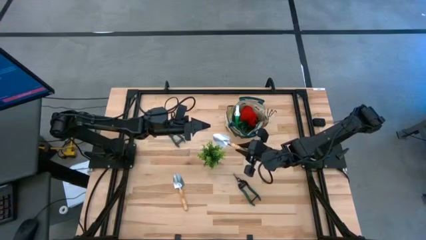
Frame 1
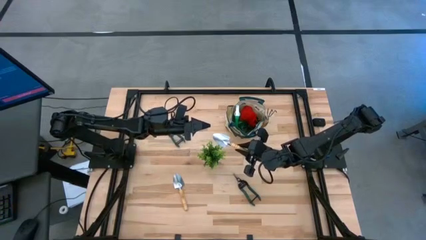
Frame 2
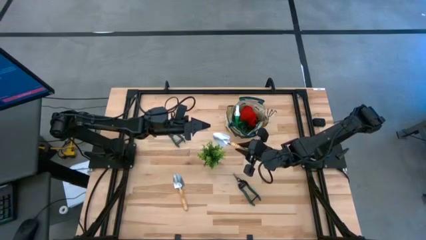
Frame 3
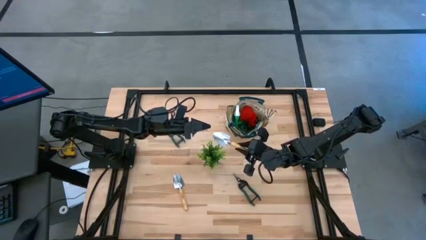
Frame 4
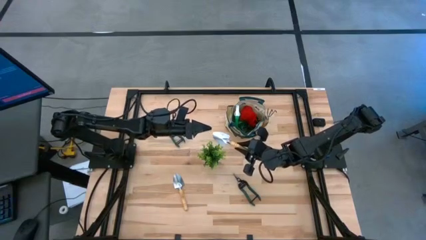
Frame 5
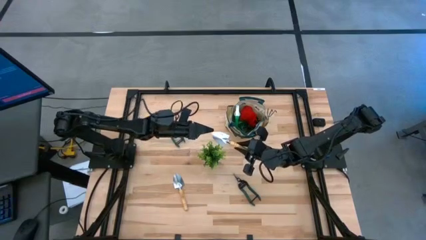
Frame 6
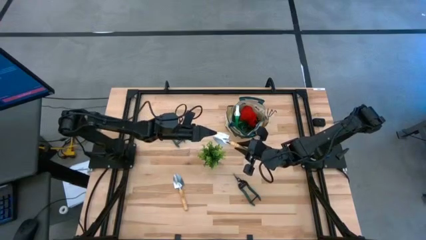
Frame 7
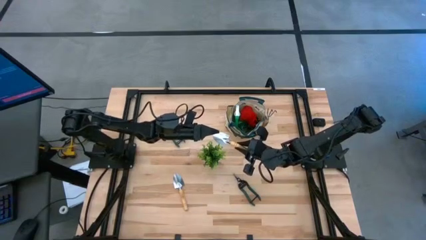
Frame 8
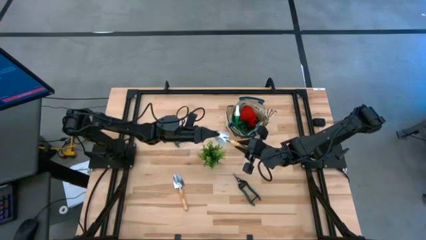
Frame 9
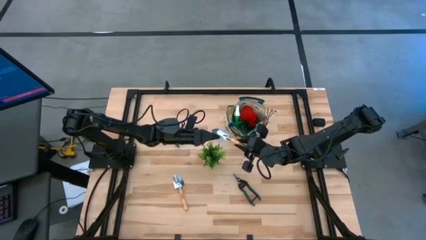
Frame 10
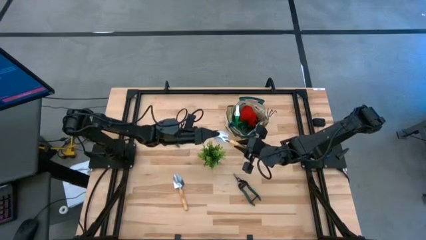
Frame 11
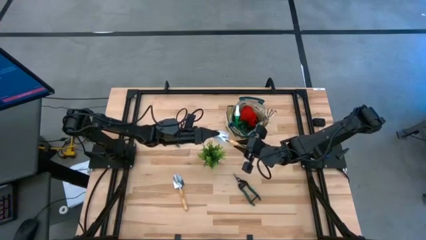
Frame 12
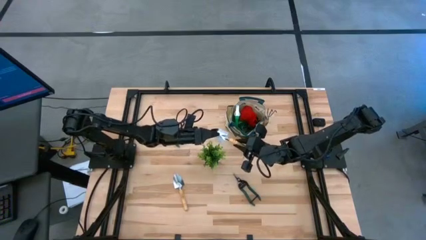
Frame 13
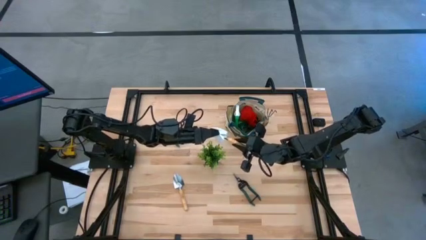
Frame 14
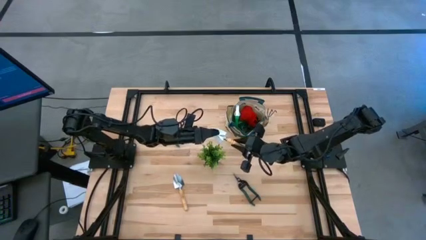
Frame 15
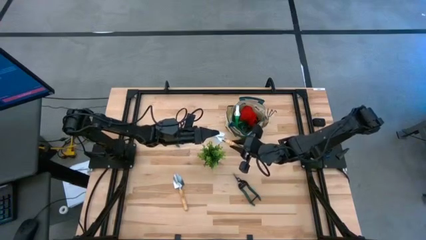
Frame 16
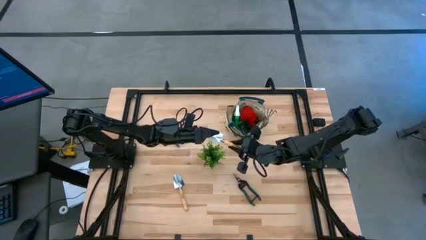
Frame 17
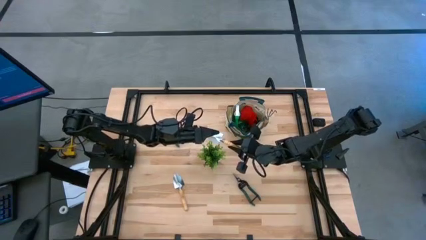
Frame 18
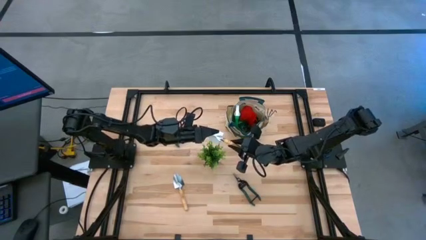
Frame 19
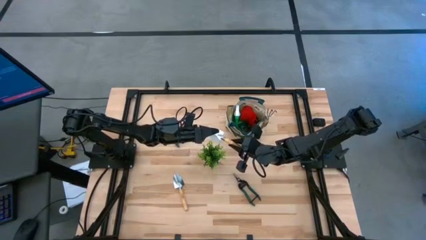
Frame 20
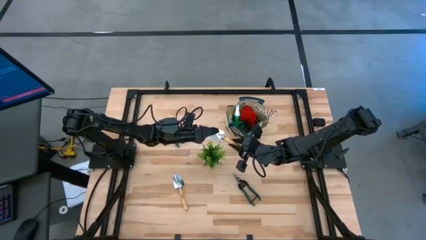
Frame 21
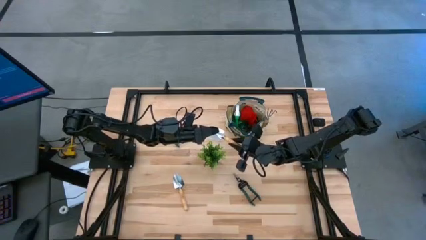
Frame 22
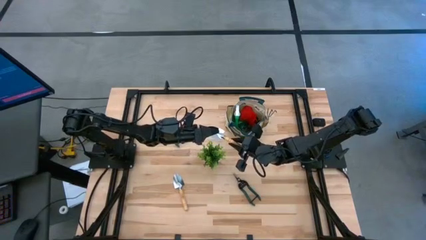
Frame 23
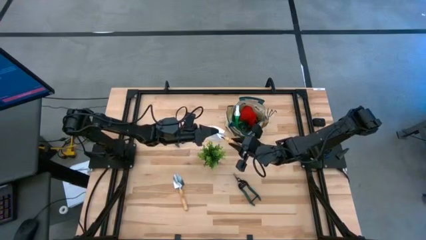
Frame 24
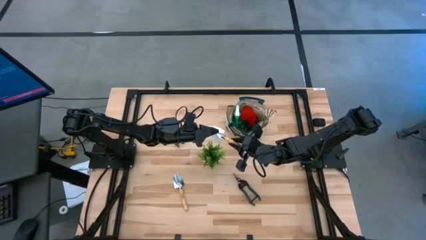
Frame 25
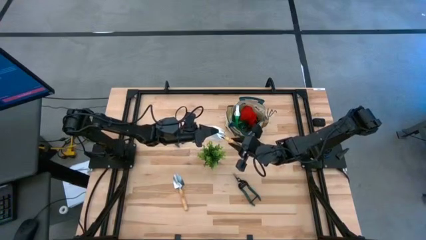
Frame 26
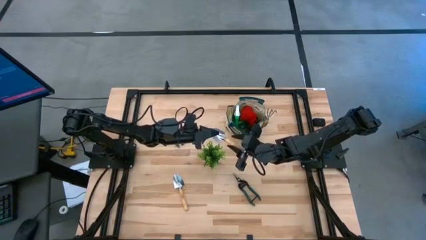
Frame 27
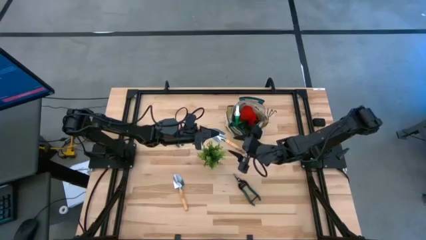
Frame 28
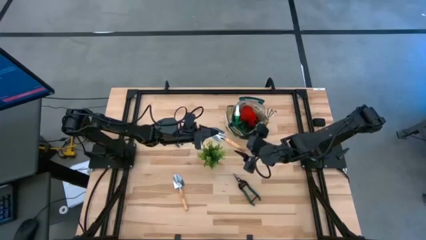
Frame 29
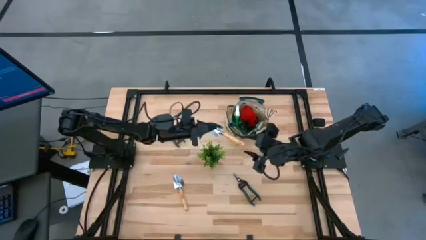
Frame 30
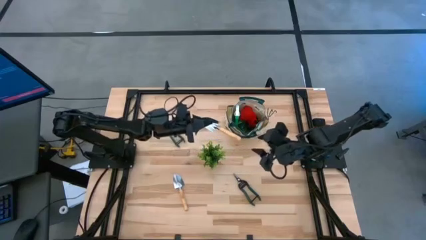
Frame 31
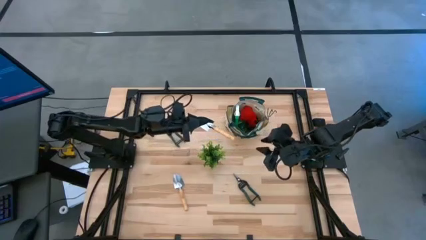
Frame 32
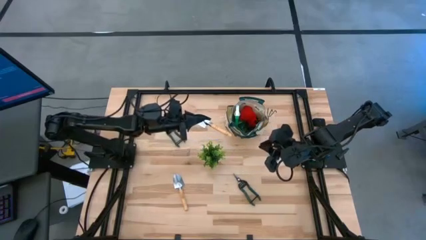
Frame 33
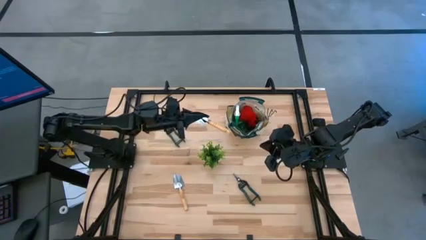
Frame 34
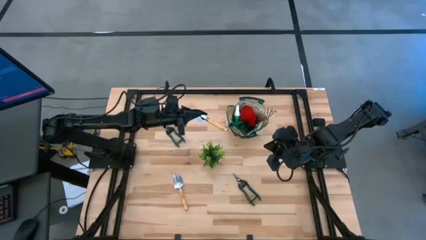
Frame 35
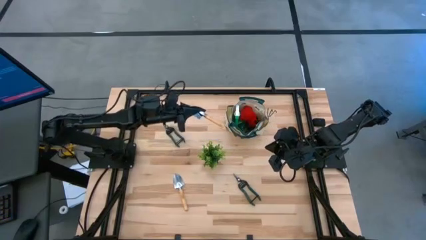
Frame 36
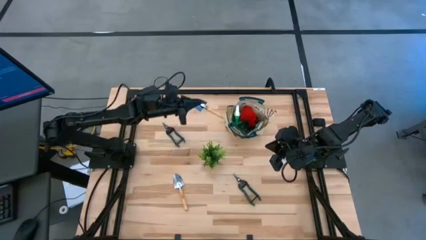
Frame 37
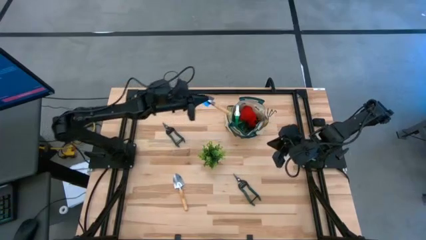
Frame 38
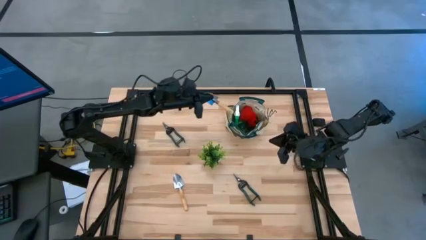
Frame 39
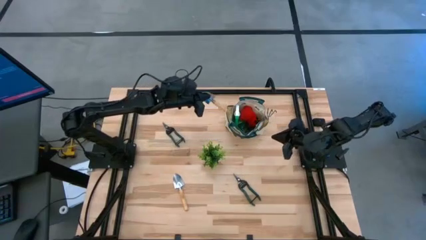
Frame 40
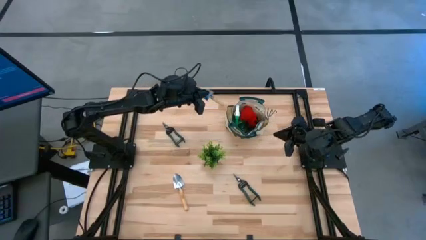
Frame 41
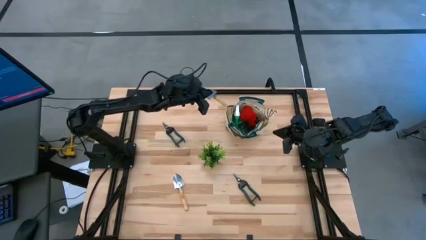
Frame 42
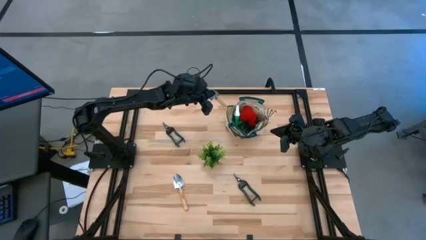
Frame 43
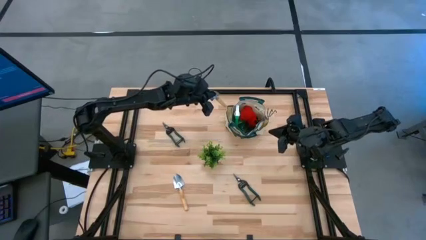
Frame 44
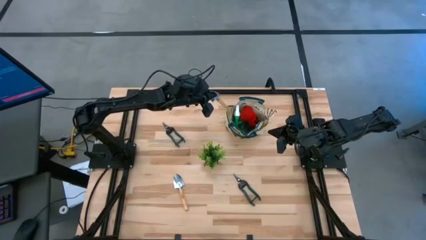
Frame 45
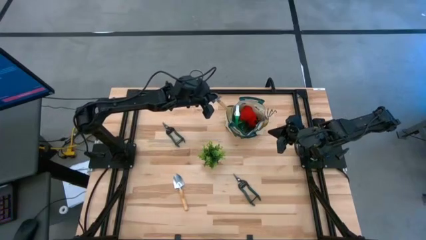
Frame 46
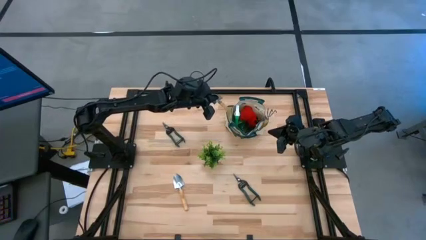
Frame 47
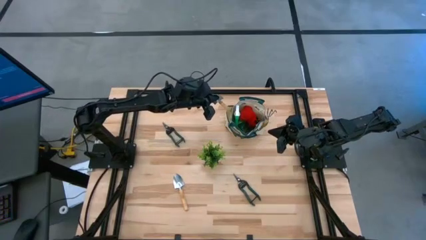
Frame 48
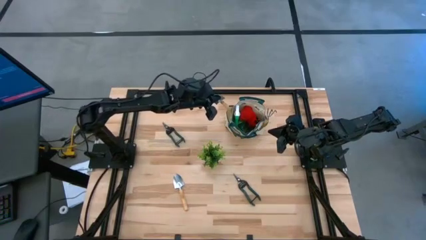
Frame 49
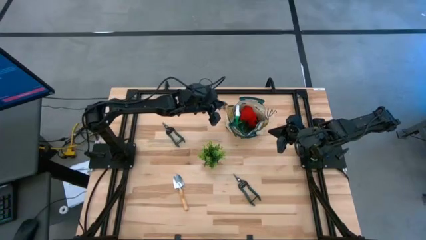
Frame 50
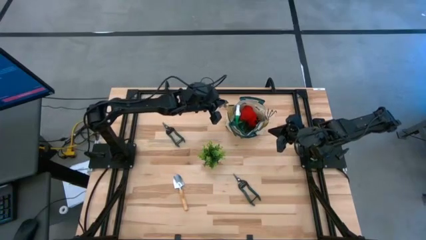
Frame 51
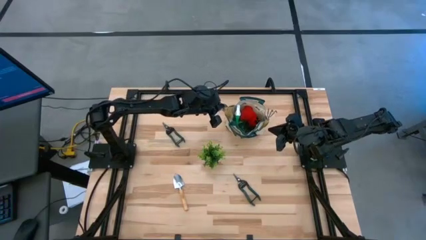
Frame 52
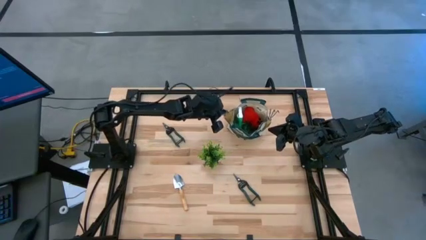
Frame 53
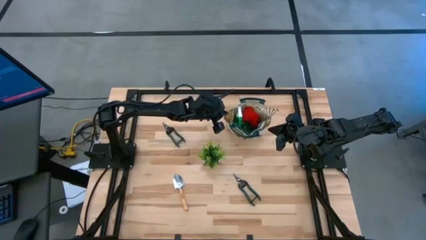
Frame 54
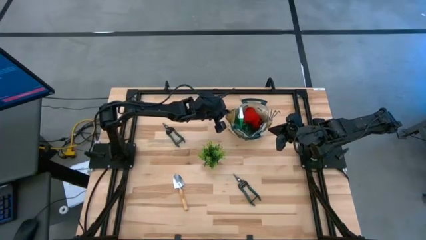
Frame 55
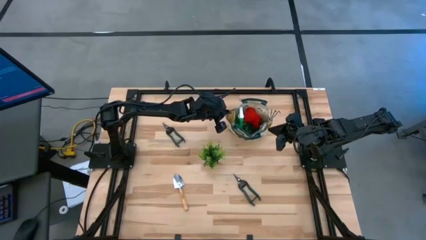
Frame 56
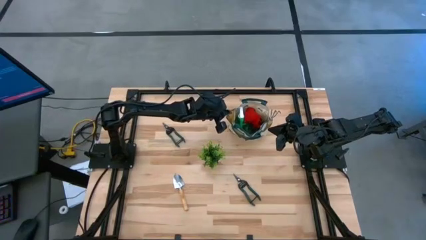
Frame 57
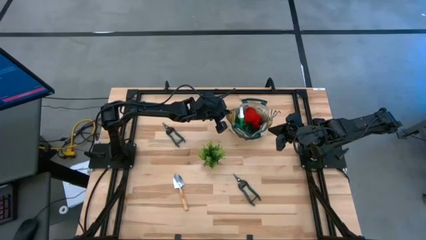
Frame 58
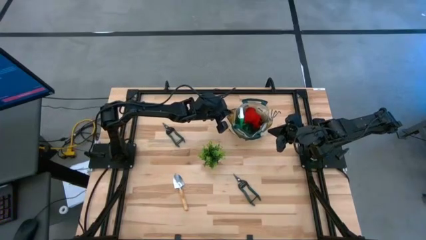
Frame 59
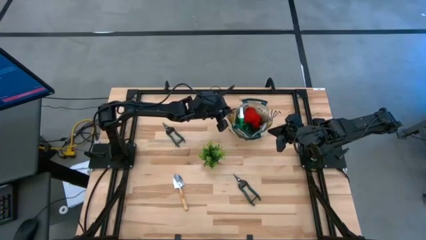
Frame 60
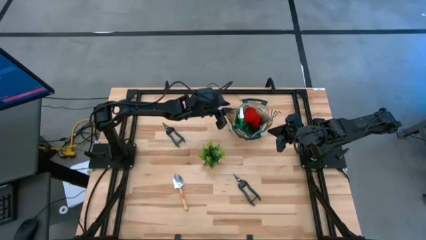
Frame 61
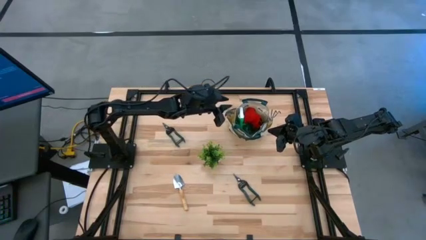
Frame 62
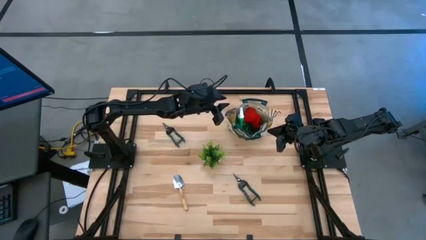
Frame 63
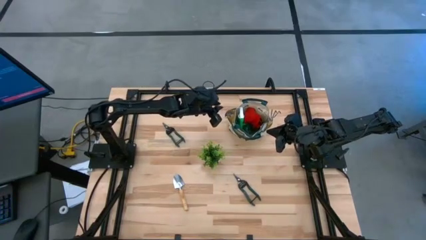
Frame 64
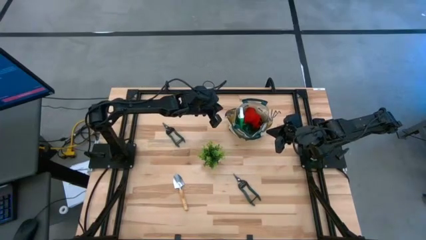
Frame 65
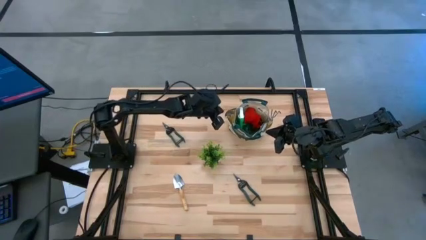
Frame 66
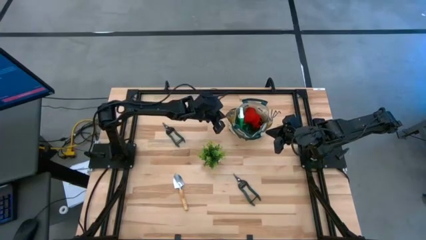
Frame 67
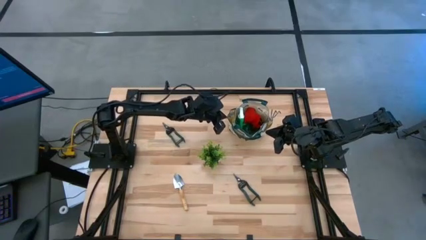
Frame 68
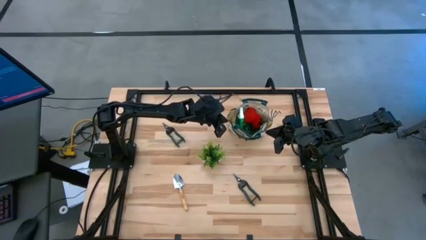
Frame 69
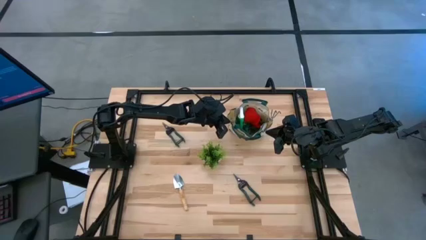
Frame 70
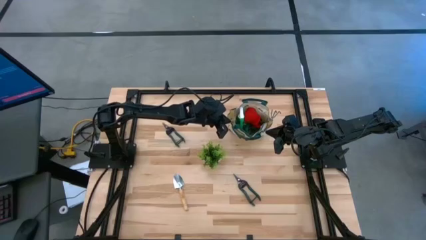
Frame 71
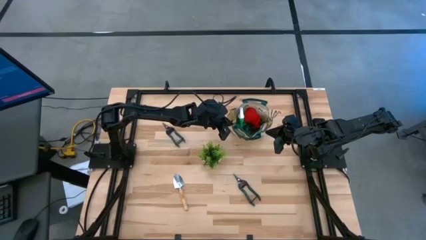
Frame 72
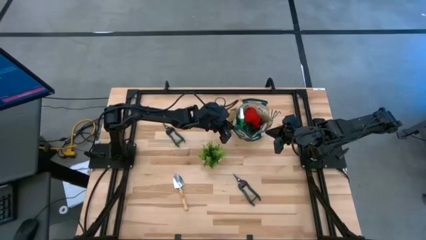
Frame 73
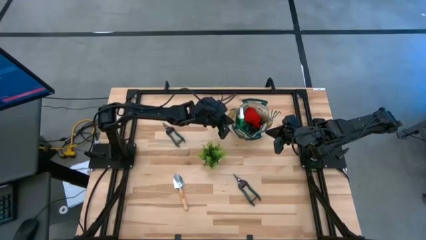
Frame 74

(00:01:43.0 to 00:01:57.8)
Task: Pick & Place Garden tools in Gardening bag
Put the top brown trowel into the brown gardening bag
